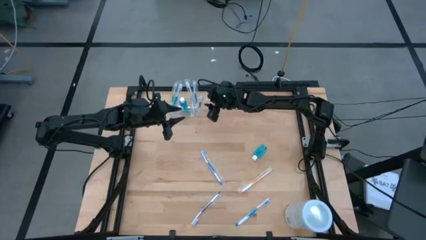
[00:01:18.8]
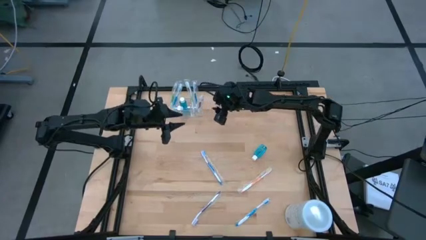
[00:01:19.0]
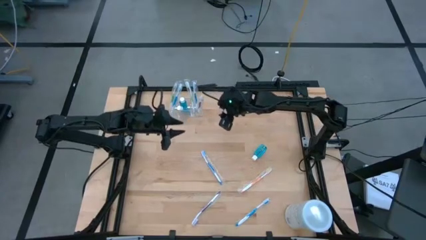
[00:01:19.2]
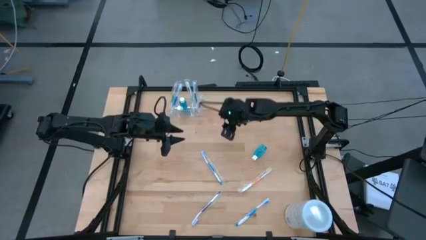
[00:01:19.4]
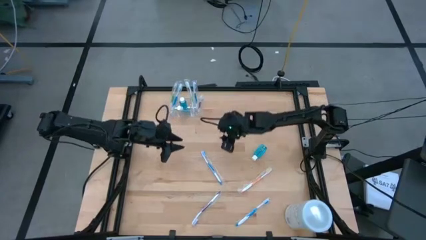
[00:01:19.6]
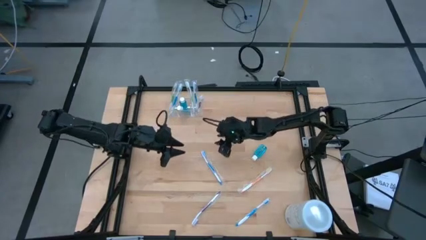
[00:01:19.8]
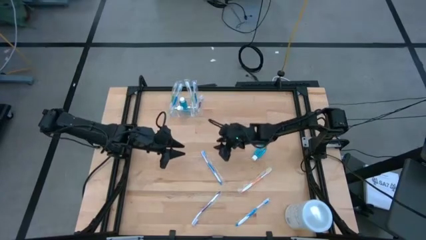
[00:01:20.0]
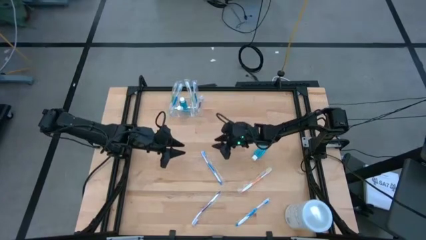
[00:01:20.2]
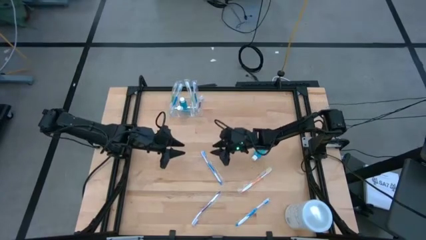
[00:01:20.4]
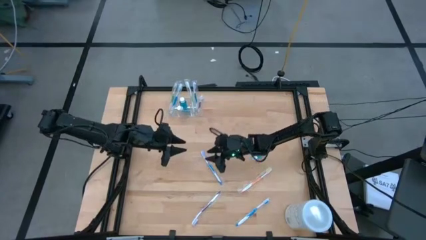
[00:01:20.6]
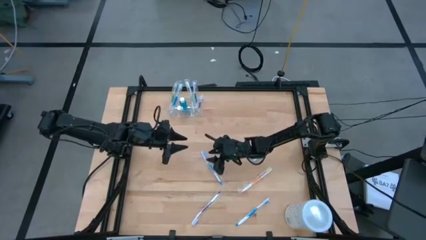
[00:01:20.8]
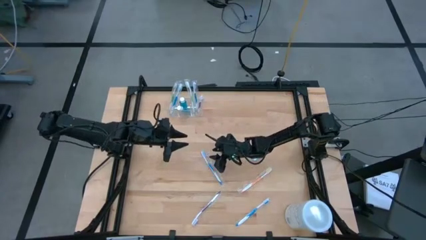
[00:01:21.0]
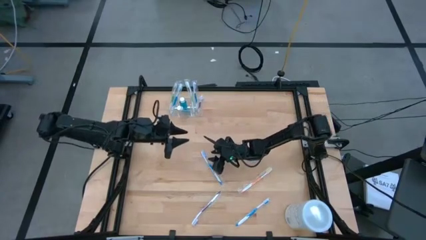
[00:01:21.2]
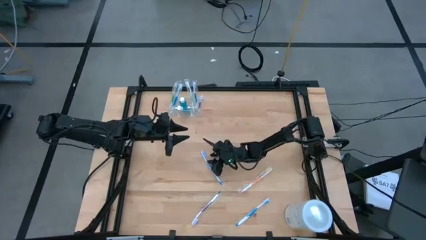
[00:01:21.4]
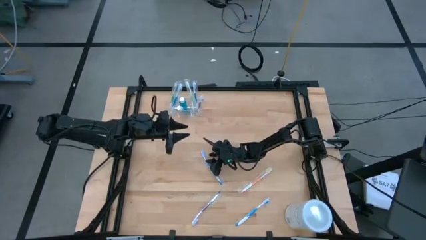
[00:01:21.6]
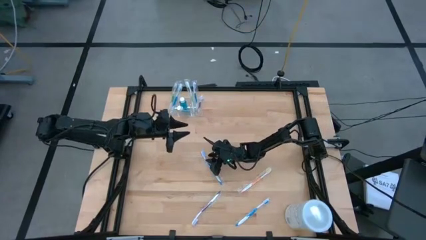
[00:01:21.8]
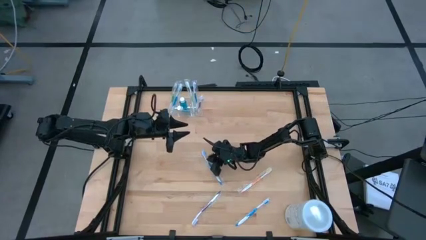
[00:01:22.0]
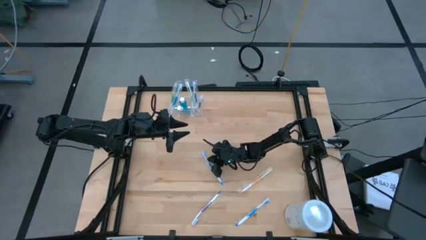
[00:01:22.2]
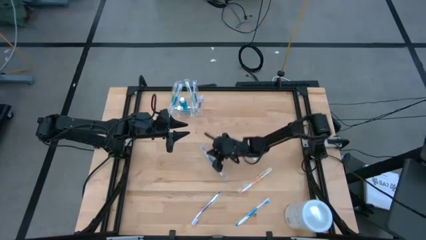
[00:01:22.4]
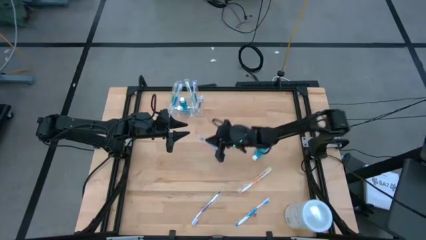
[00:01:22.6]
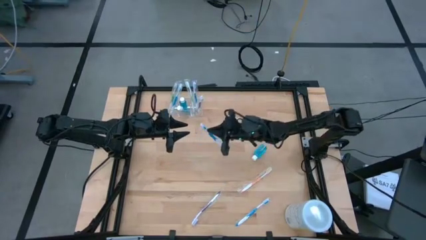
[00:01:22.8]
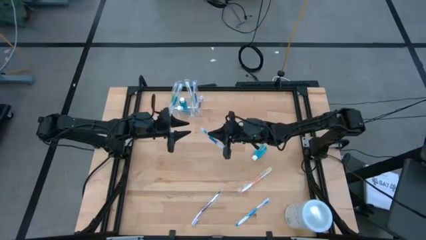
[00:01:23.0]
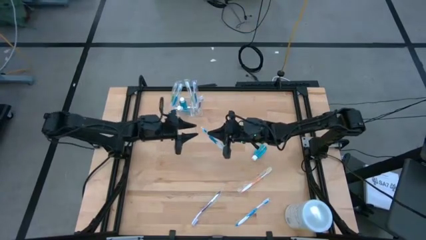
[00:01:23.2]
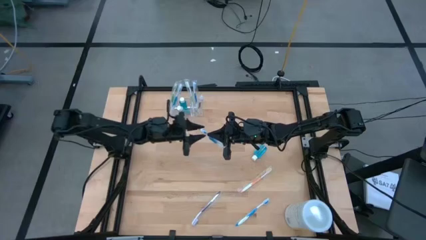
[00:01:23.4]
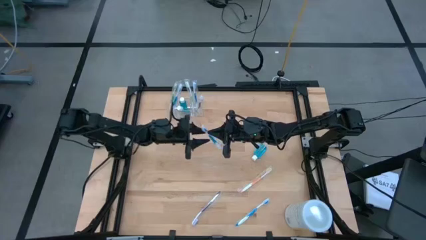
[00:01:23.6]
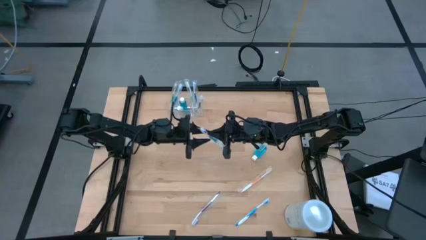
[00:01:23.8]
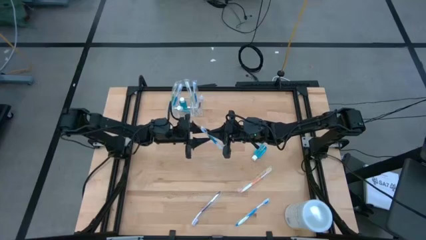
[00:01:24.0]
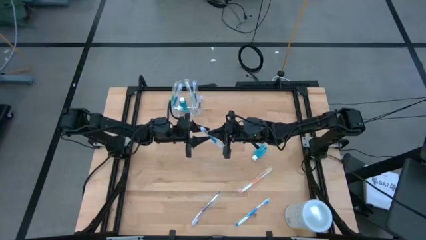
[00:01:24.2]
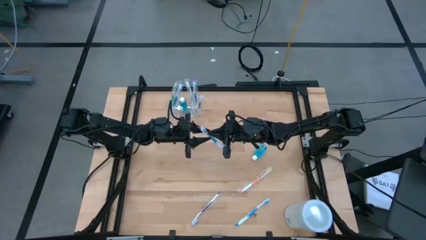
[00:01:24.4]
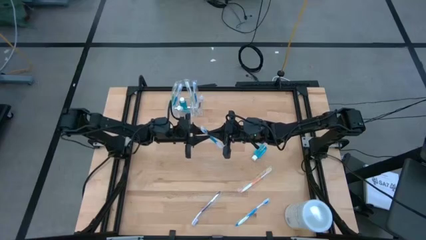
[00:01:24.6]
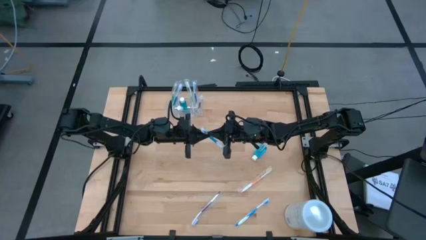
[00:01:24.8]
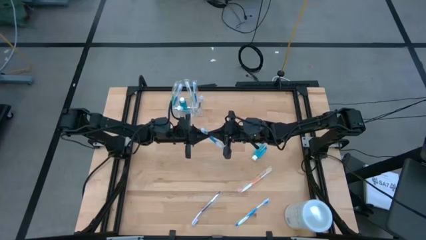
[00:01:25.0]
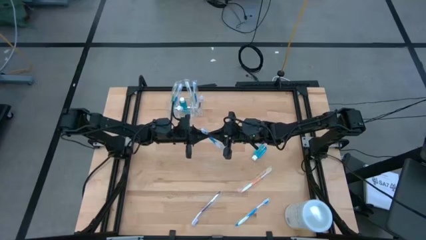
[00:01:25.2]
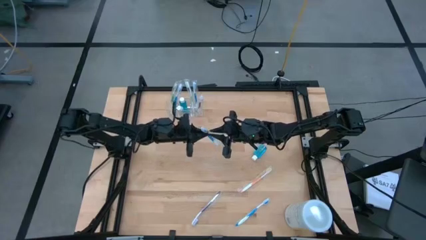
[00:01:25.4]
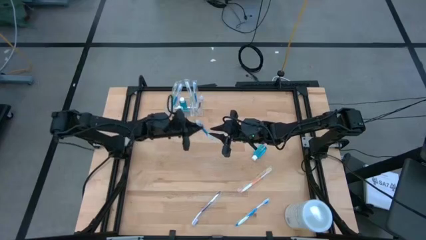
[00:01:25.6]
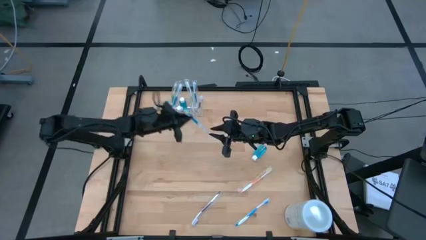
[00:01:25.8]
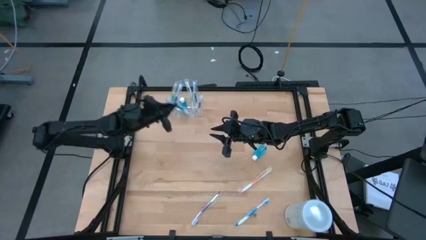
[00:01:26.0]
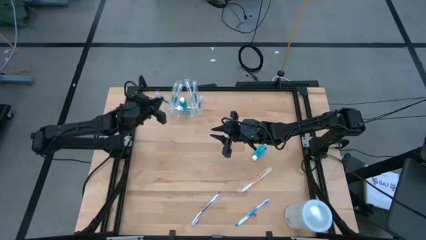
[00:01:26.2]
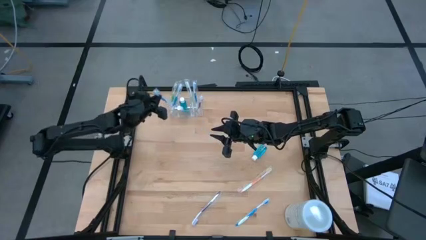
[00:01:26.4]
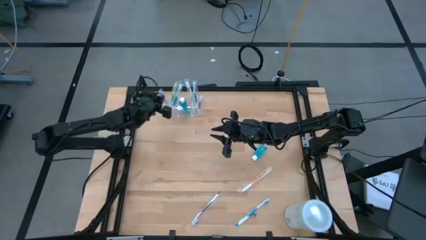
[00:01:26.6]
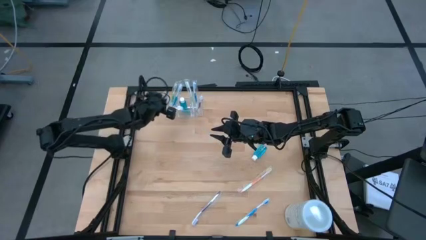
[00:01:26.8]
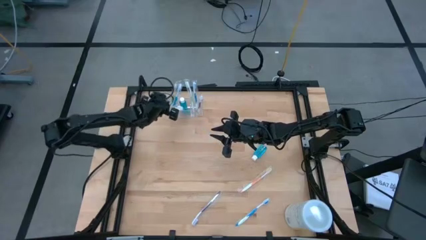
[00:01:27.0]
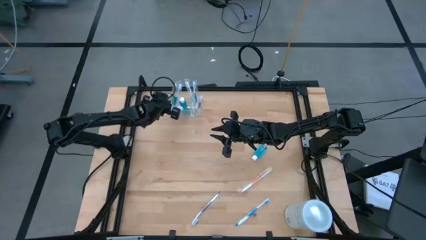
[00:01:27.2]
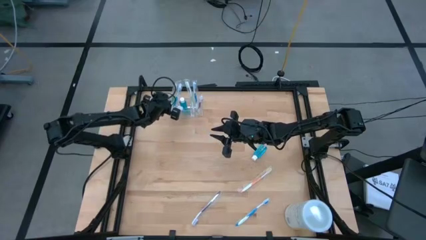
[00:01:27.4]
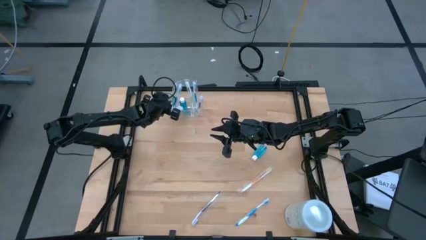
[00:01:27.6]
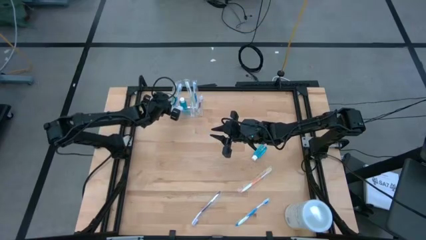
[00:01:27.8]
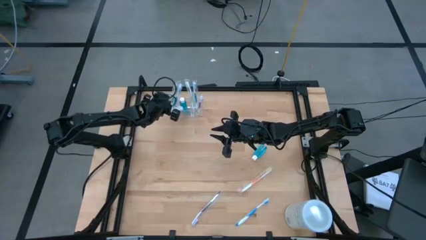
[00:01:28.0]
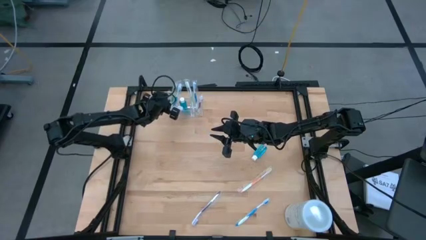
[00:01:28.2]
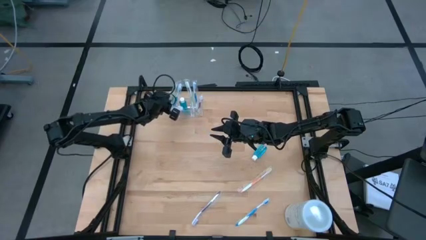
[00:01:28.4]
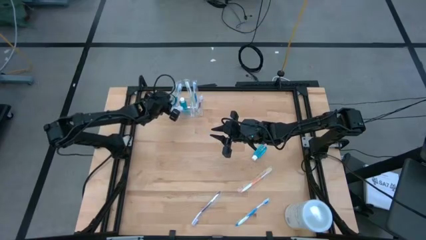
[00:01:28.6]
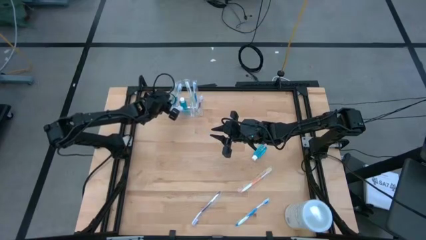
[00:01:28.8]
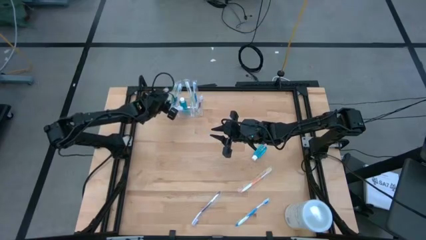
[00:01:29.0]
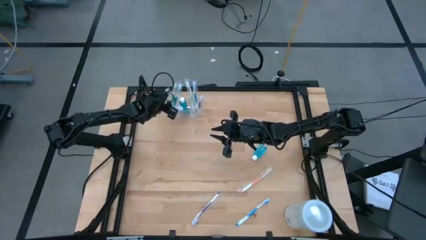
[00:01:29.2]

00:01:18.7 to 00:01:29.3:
Task: Pick & Place toothbrushing station
Put the blue toothbrush into the transparent organizer

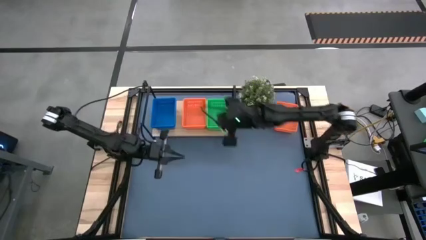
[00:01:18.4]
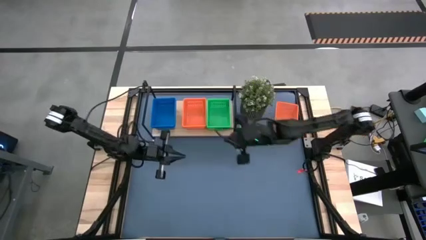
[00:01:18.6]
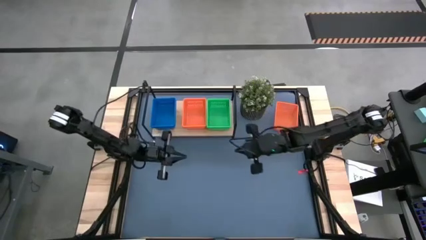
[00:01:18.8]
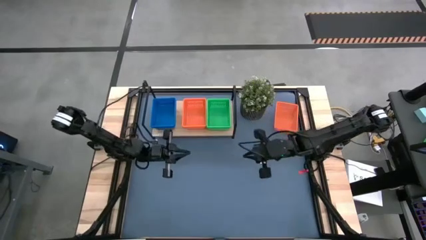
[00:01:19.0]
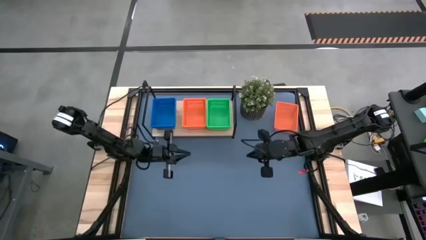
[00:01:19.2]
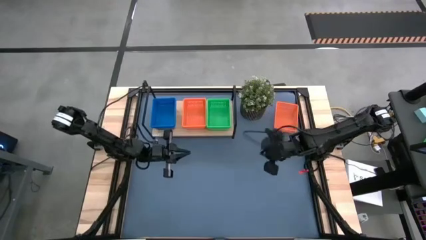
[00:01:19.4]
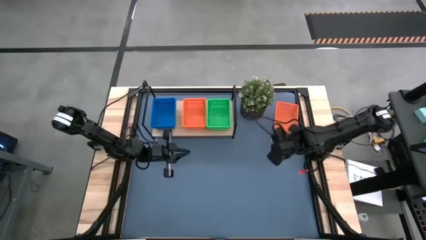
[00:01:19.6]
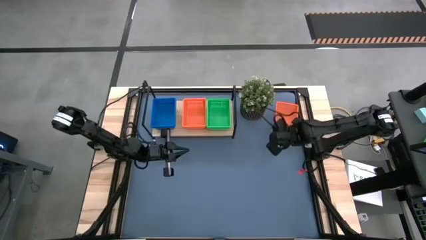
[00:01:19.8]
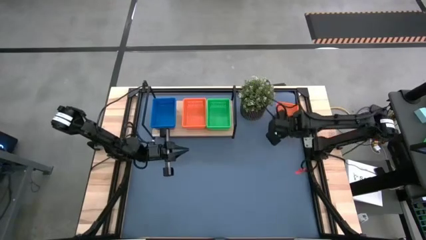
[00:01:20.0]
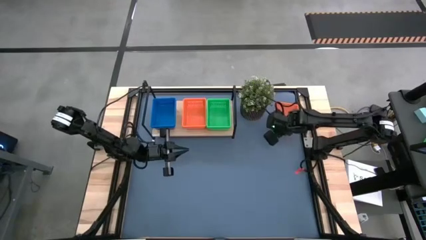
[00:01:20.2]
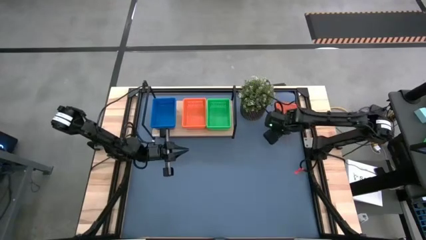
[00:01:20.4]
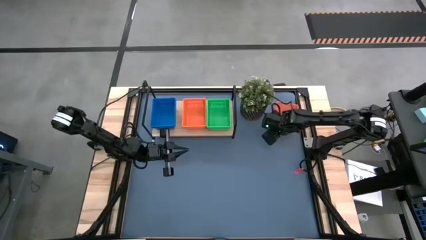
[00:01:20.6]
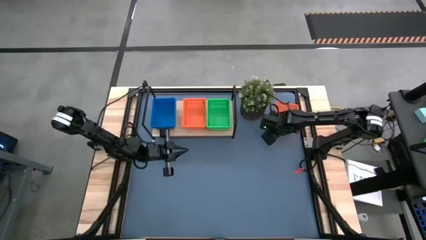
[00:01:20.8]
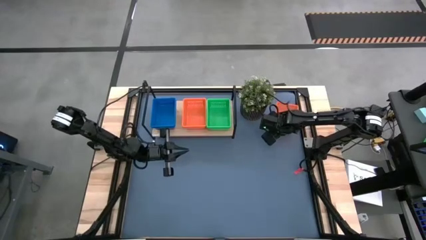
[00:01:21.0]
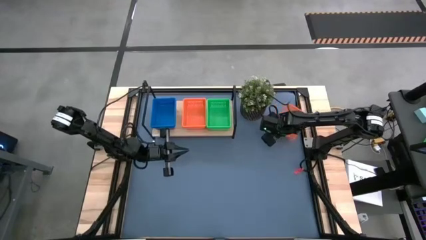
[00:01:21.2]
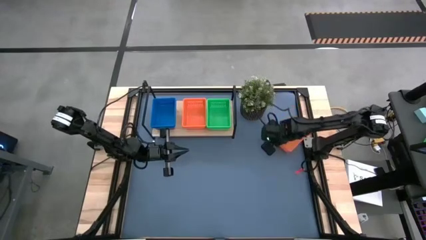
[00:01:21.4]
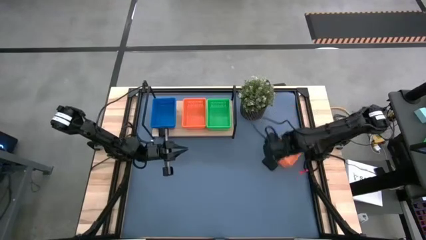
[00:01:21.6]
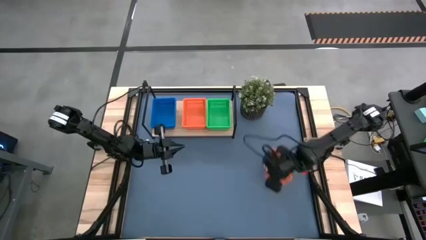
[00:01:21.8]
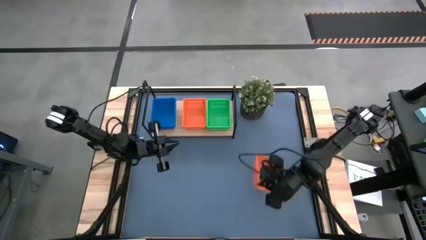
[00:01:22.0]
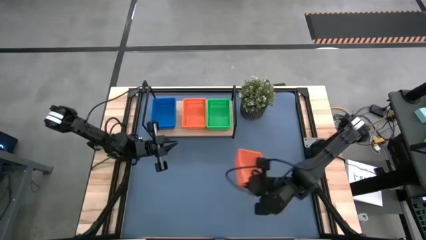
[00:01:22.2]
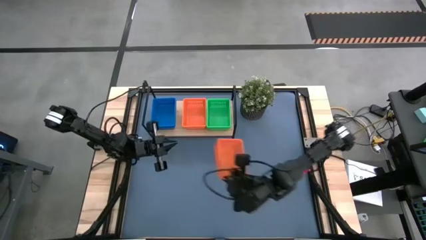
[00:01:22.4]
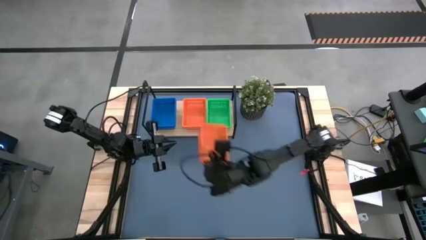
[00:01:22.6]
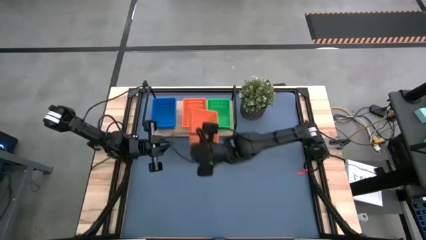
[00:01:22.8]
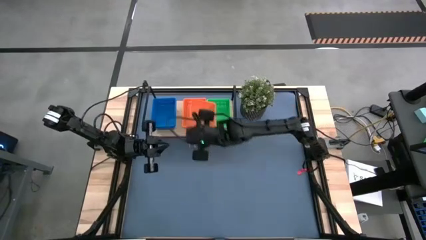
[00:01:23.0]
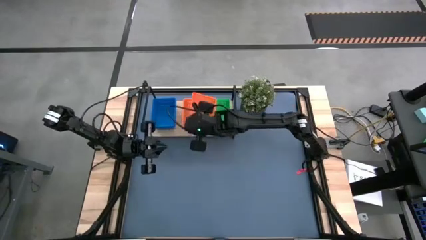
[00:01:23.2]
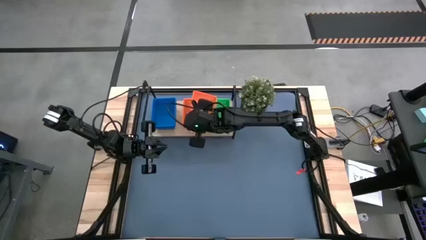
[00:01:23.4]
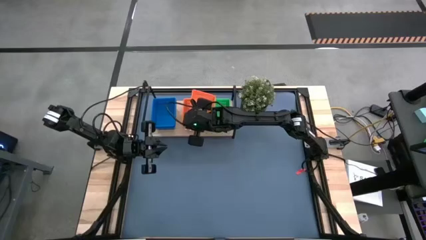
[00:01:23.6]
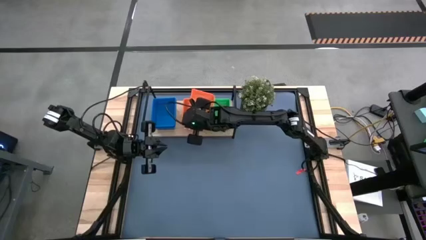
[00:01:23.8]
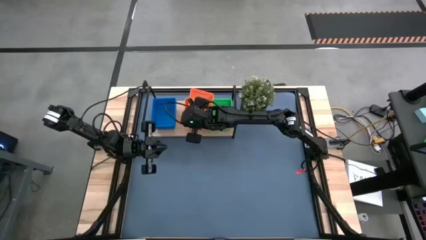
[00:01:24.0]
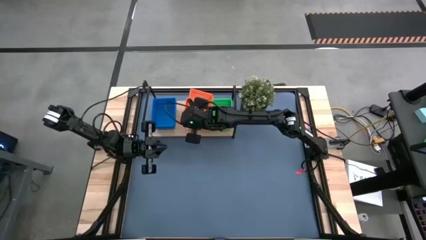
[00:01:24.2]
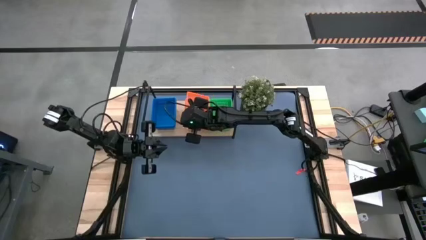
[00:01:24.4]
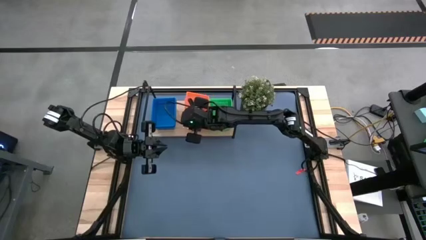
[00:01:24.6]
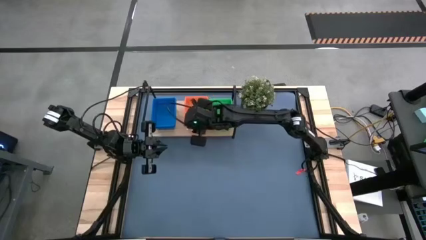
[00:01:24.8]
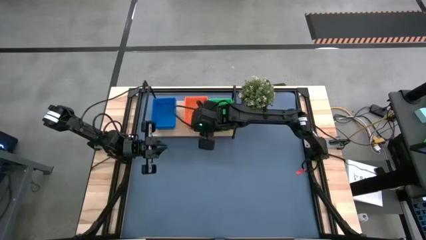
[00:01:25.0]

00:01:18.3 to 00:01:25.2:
Task: Stack baskets on shelf by color
Stack the orange bin on top of the orange bin on the shelf
